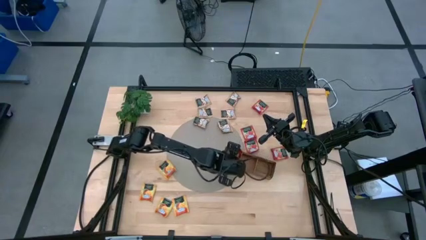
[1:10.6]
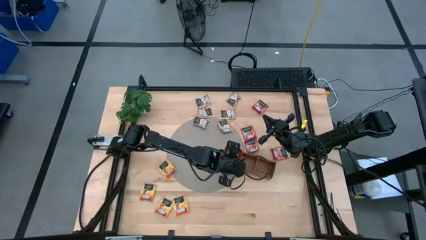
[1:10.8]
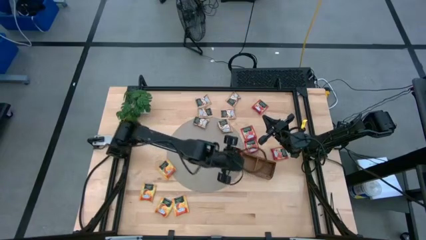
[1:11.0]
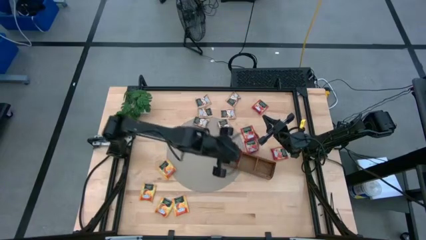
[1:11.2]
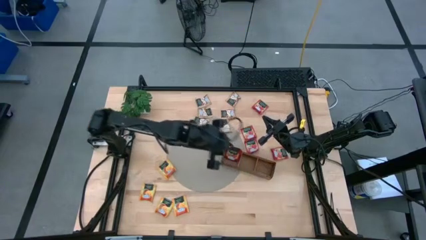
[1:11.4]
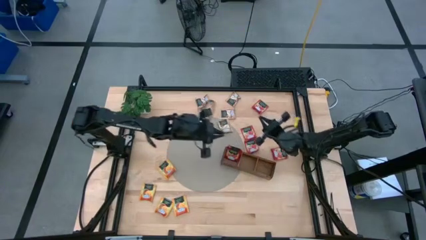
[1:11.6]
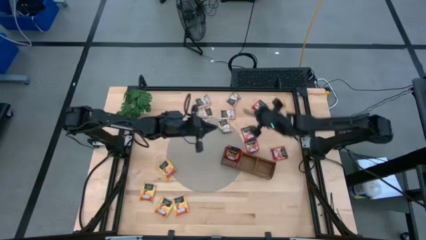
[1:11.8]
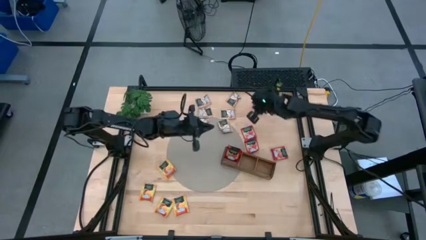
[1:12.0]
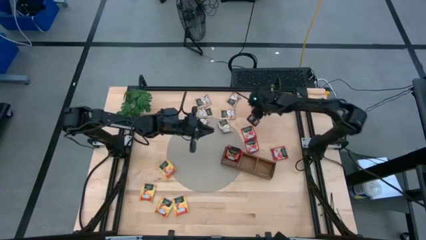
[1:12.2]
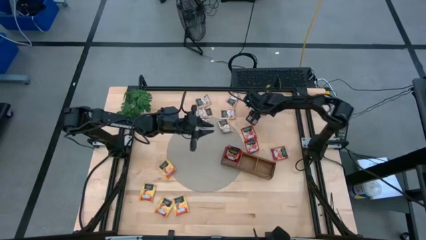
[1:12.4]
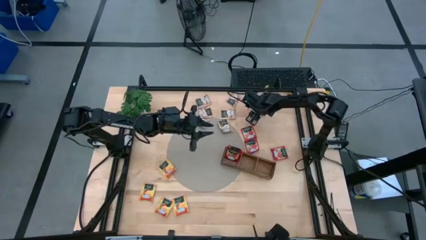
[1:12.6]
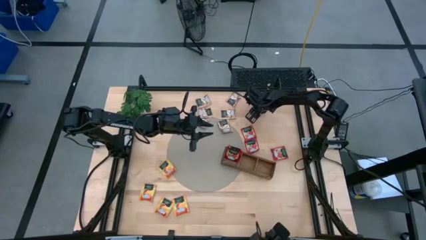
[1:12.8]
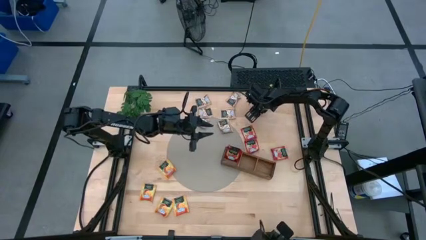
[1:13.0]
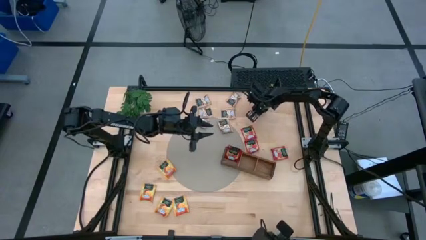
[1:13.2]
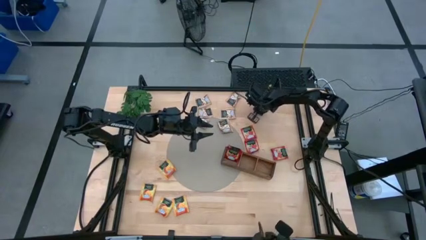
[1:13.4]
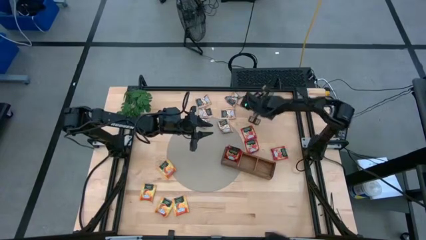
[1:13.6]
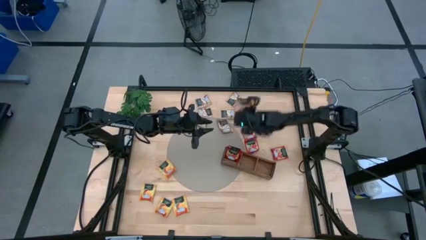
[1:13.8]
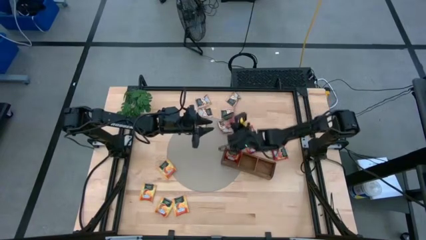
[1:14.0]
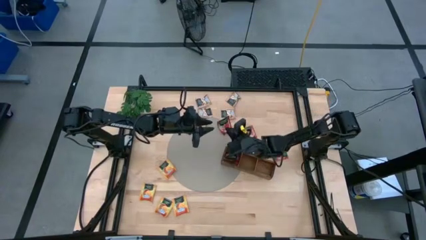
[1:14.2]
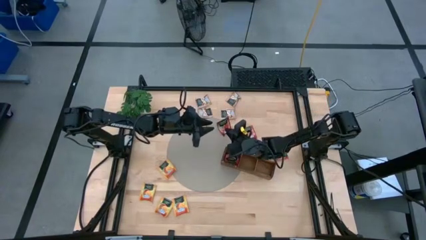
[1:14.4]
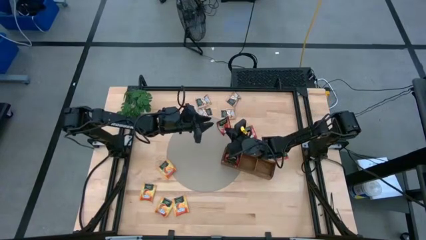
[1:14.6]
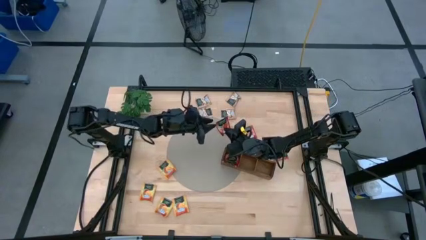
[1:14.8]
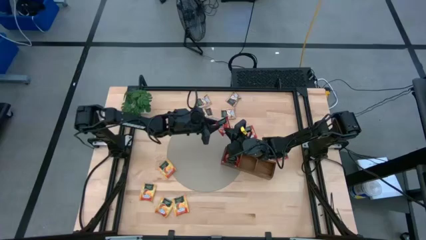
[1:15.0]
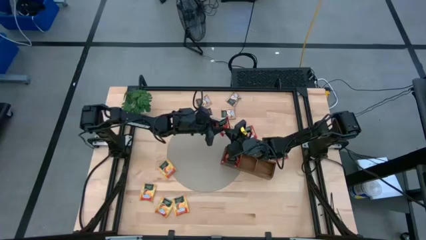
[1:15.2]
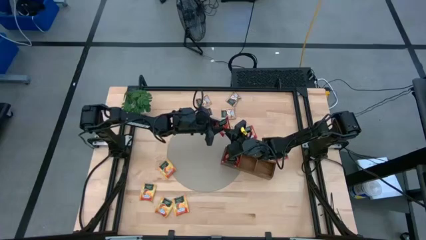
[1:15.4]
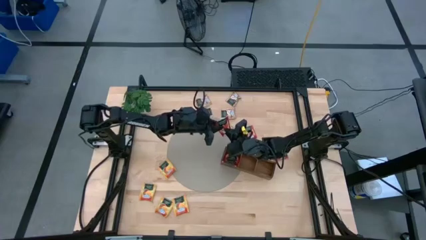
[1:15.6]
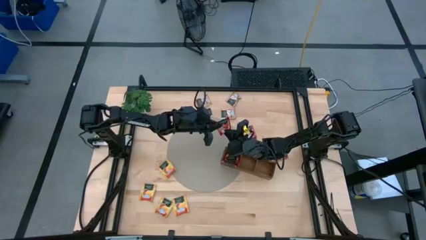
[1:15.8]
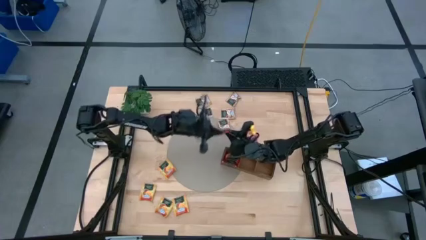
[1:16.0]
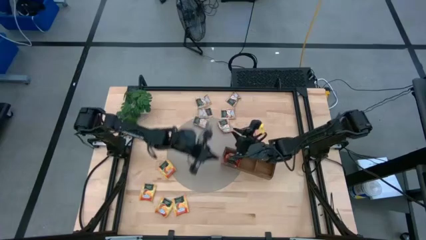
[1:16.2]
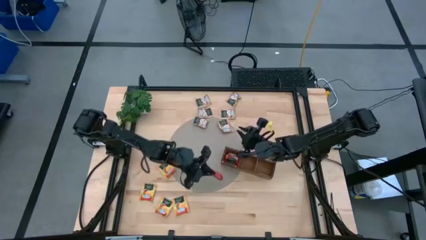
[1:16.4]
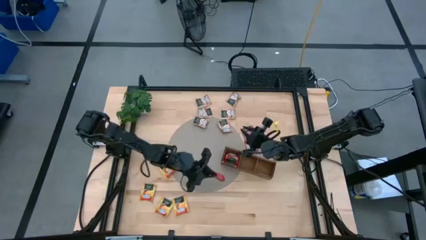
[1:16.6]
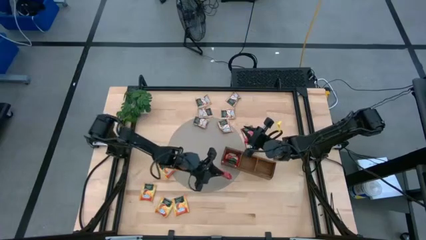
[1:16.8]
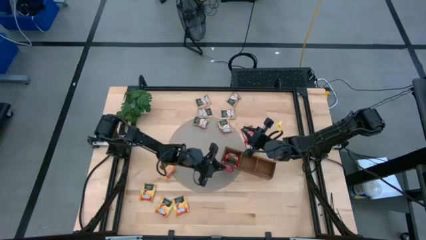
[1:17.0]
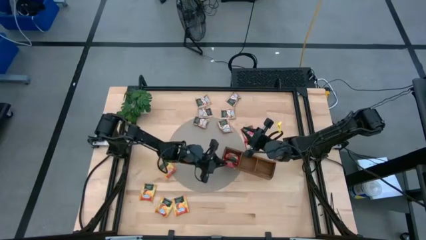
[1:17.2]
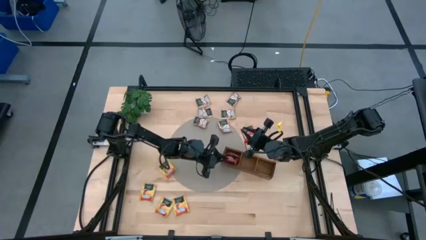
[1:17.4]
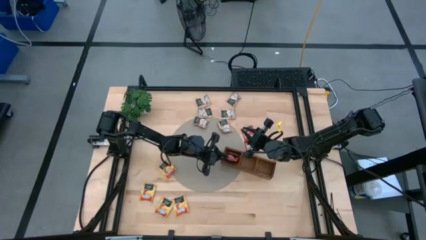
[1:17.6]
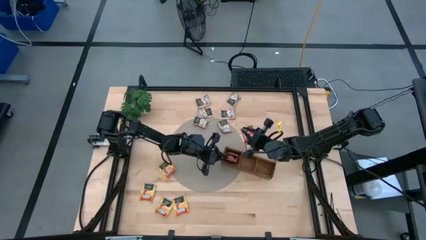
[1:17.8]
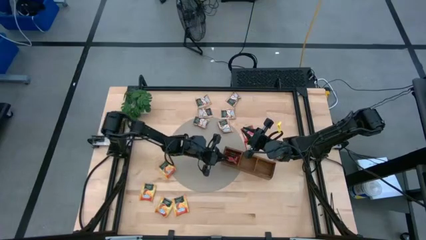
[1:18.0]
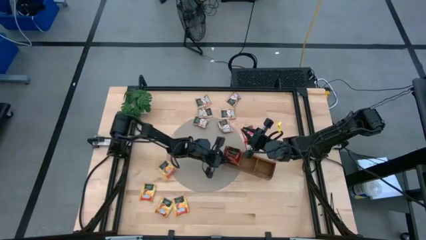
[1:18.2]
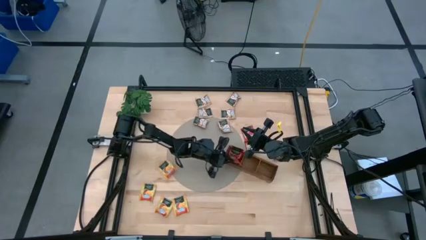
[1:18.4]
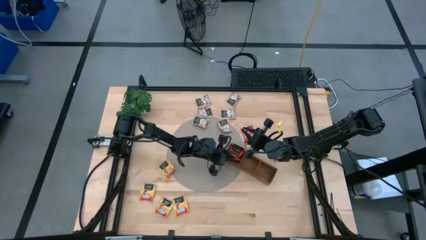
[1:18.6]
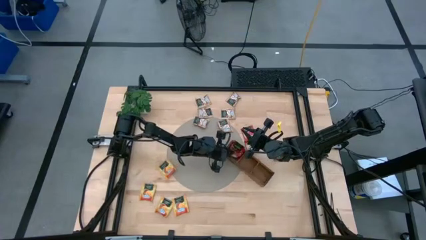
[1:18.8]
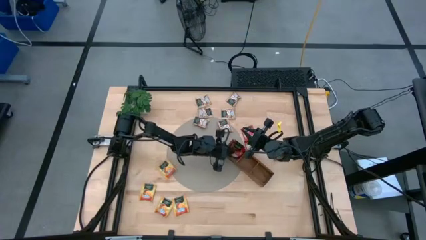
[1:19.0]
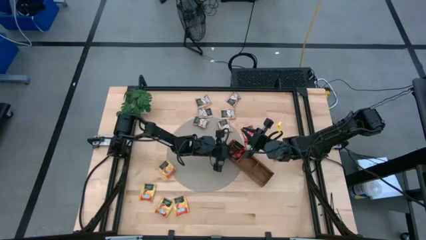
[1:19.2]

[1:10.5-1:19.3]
Task: Pick & Place Tea
Put the red tea bag into the left section of the wooden organizer

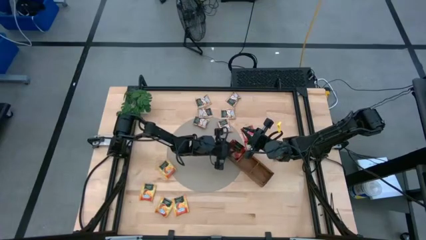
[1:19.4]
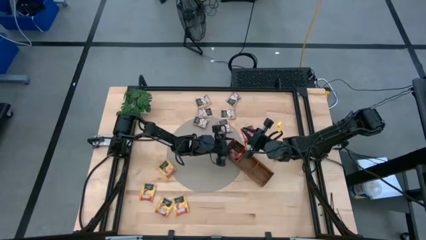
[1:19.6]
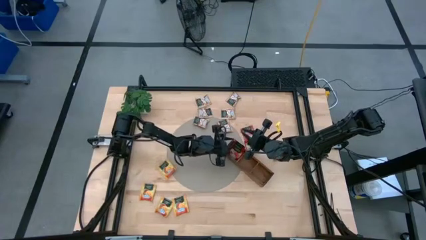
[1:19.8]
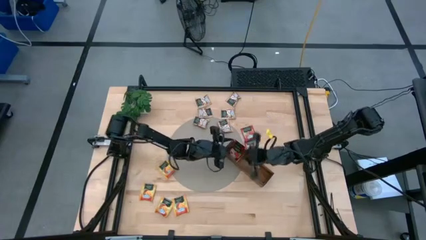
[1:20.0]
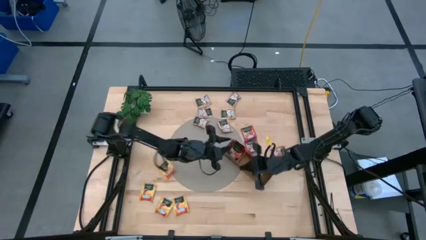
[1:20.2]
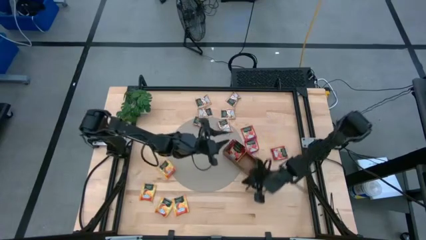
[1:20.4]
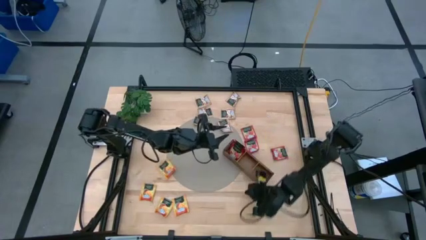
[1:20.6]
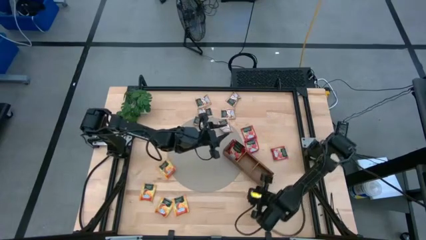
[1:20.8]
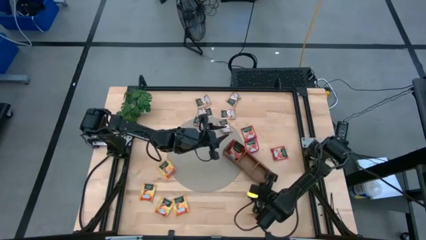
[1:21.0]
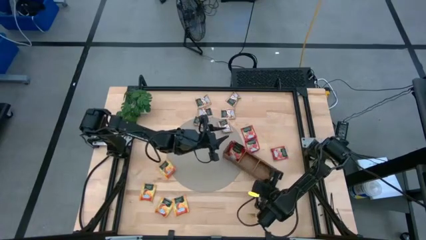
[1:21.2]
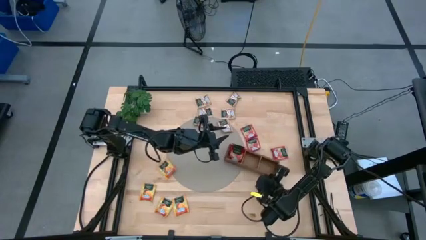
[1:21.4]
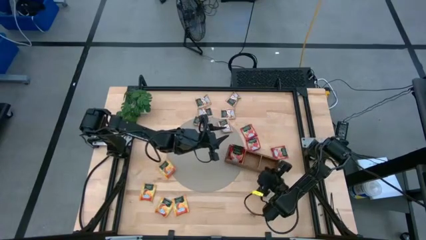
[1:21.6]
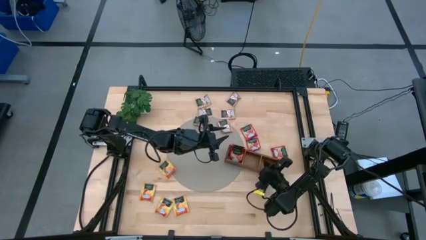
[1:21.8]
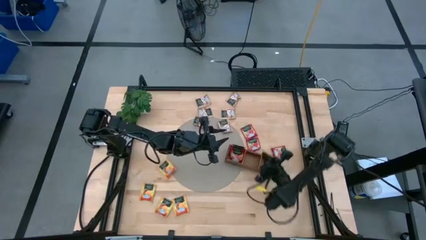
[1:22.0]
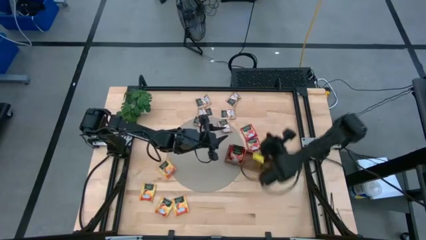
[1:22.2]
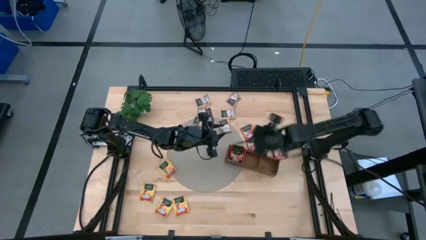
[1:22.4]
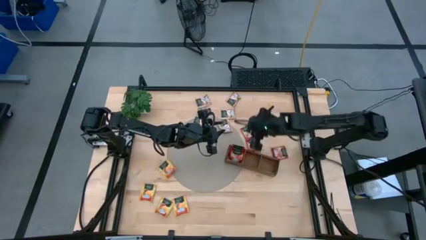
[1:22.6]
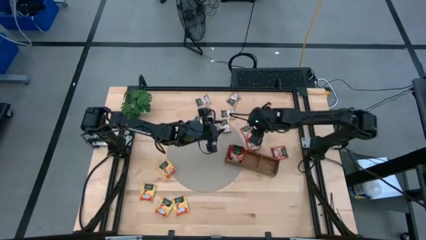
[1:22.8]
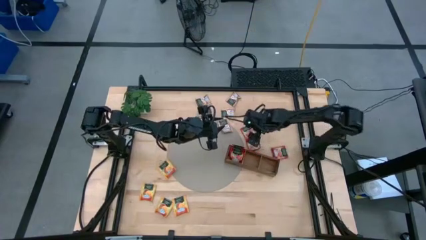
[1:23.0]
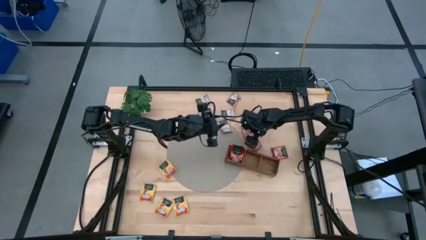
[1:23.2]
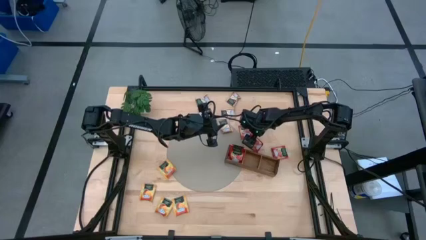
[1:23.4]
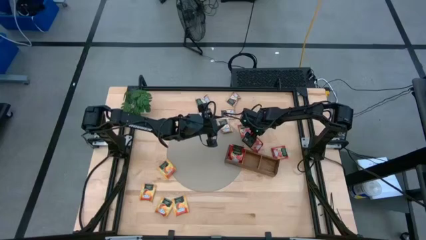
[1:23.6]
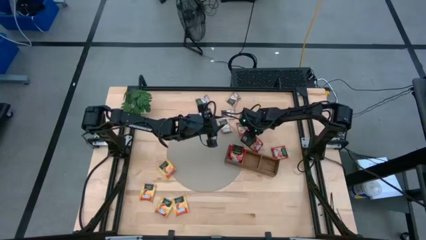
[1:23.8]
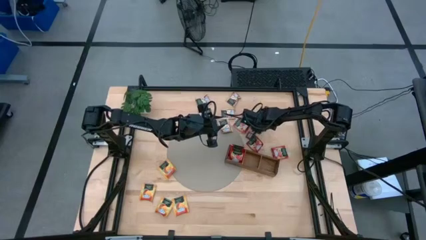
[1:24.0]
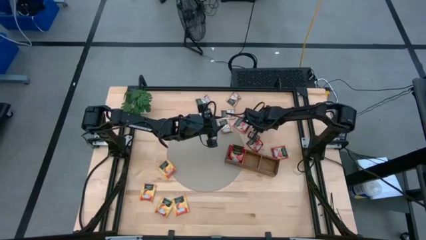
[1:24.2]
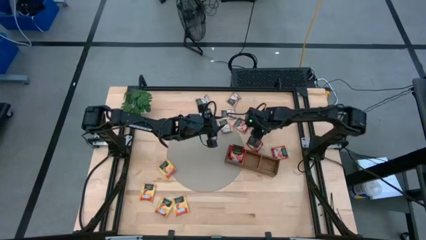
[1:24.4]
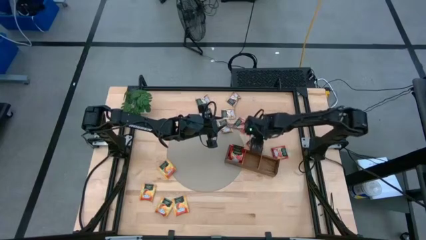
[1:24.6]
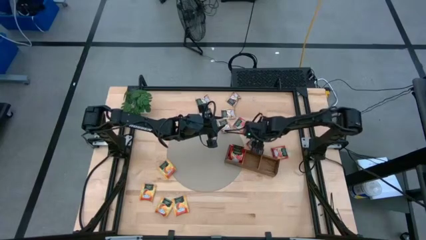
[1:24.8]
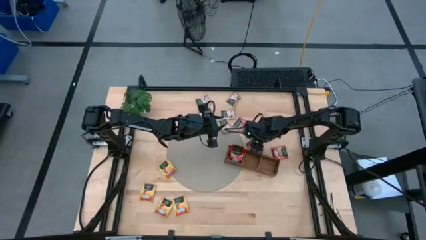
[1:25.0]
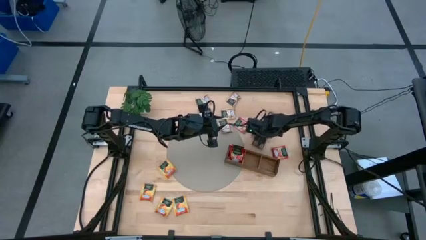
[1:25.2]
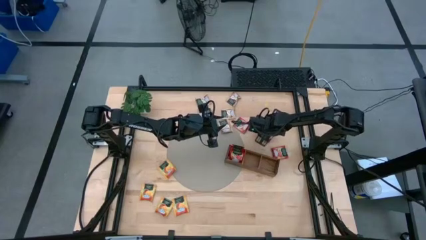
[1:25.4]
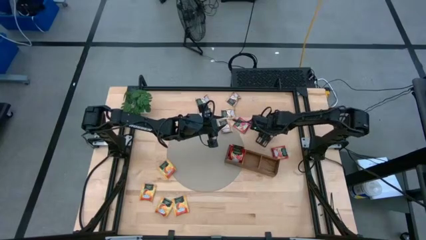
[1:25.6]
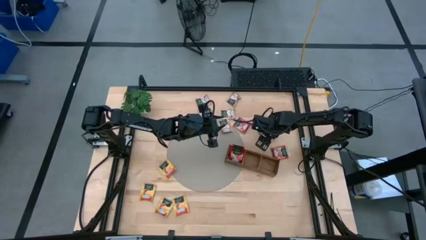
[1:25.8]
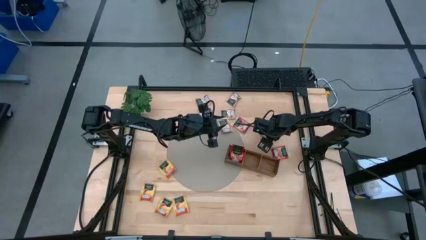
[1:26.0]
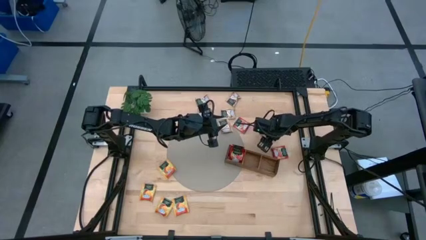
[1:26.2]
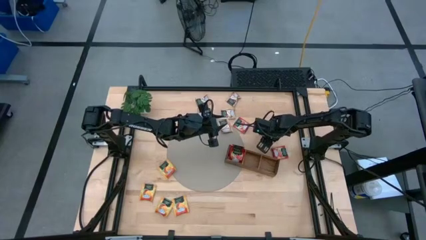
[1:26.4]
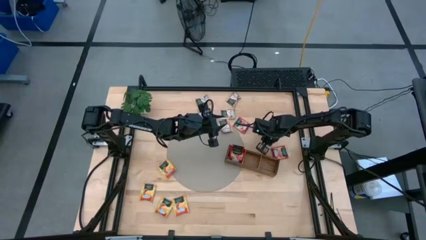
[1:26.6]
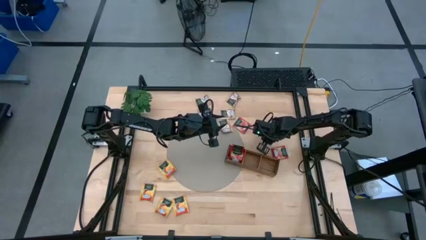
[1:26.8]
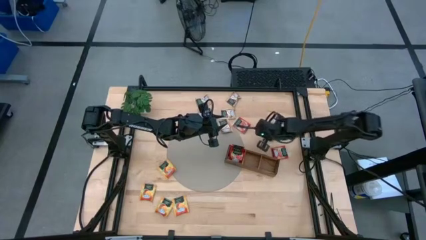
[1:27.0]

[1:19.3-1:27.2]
Put the red tea bag into the left section of the wooden organizer
